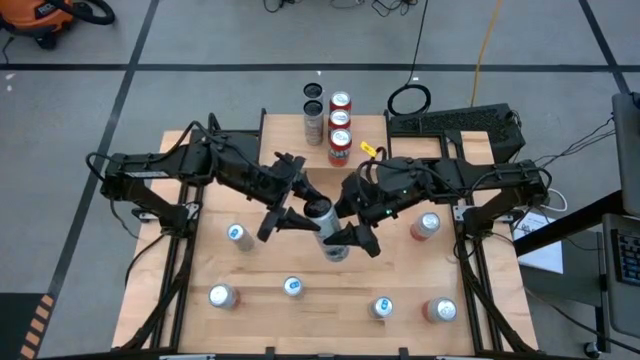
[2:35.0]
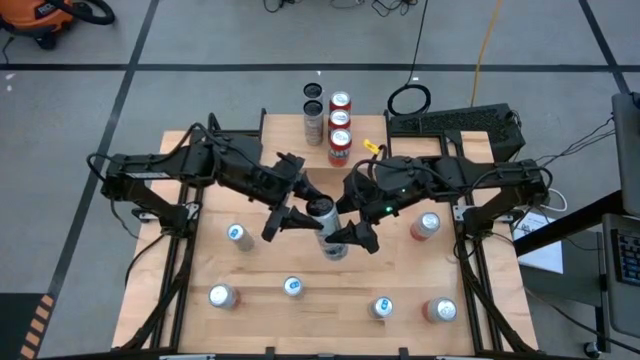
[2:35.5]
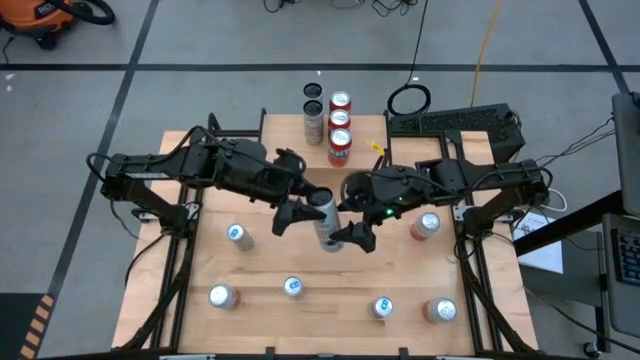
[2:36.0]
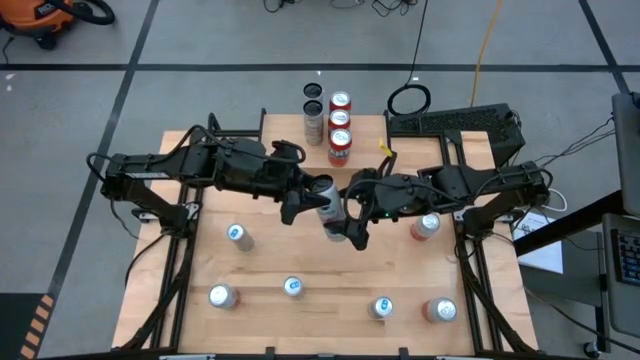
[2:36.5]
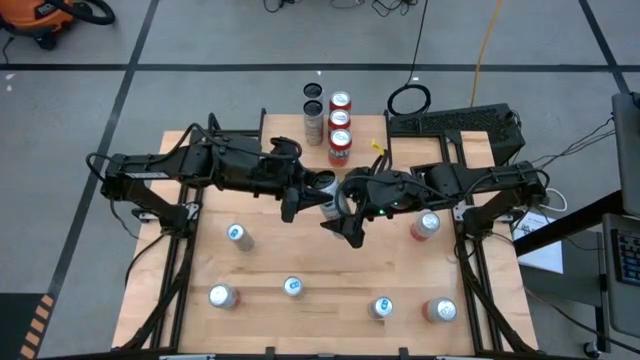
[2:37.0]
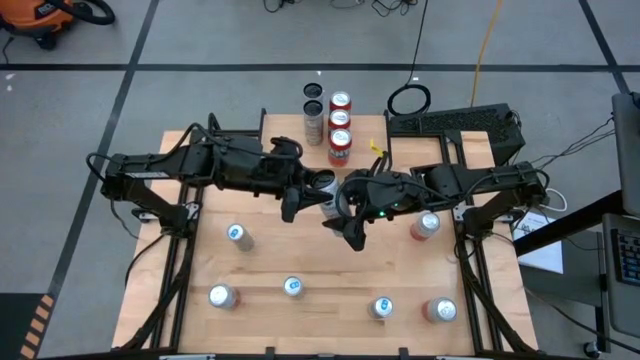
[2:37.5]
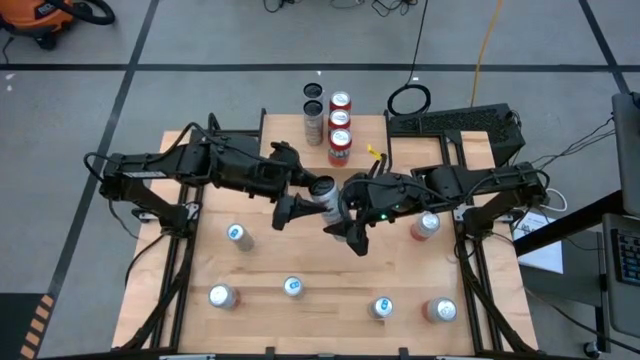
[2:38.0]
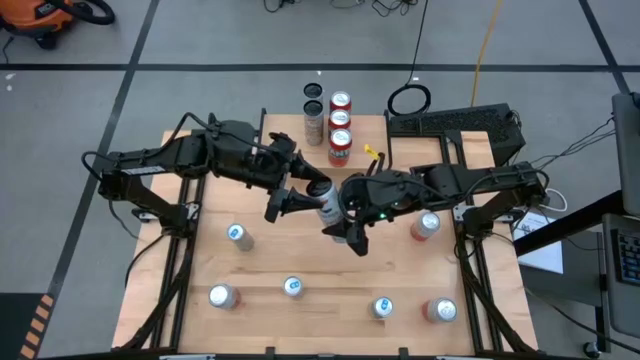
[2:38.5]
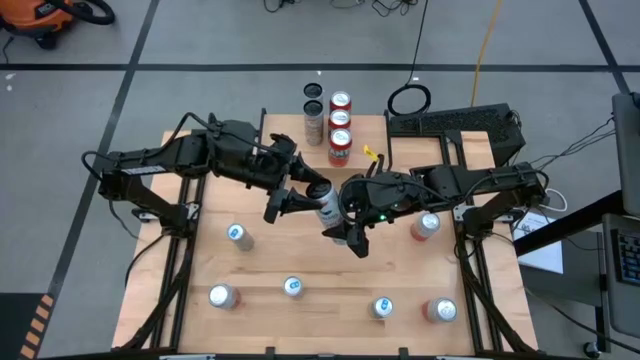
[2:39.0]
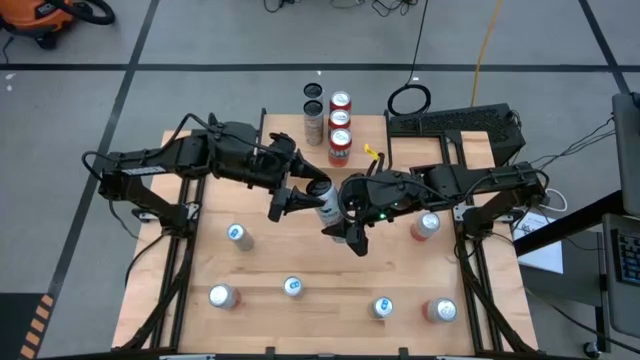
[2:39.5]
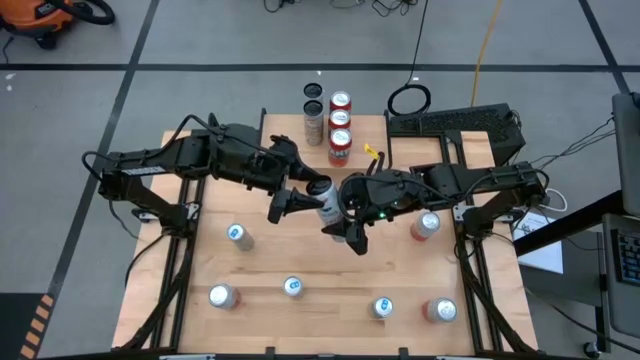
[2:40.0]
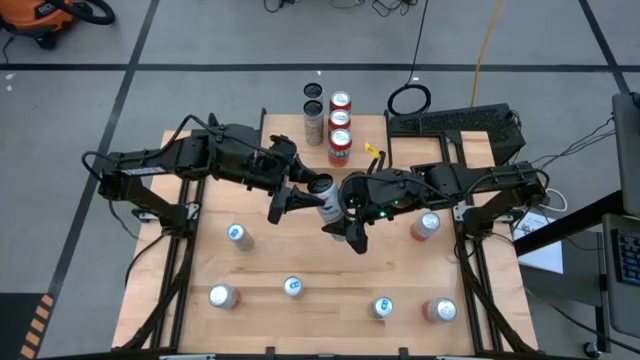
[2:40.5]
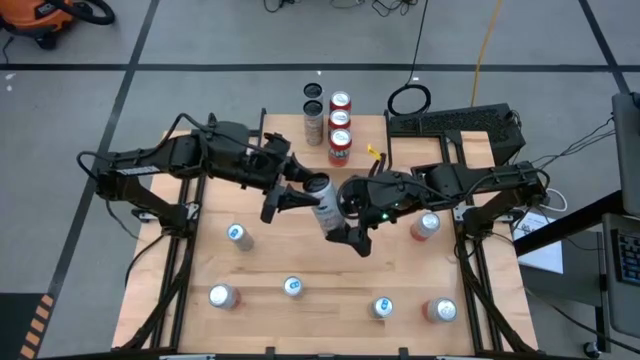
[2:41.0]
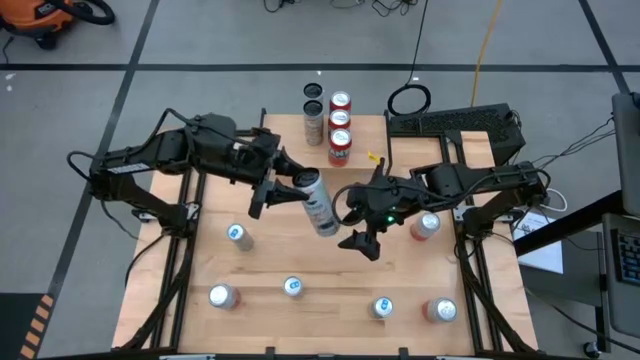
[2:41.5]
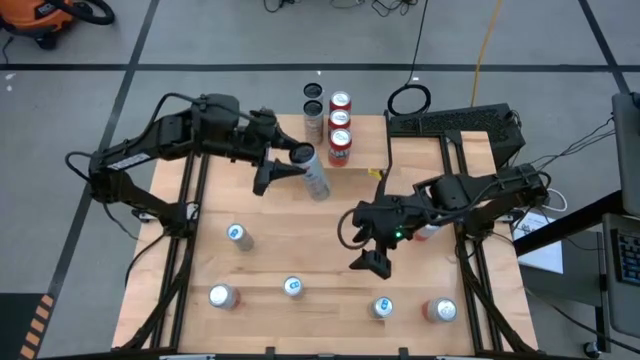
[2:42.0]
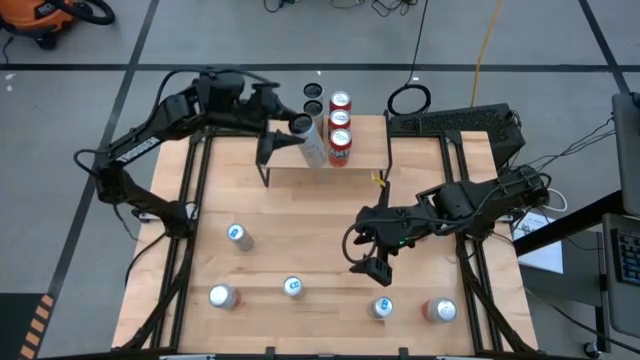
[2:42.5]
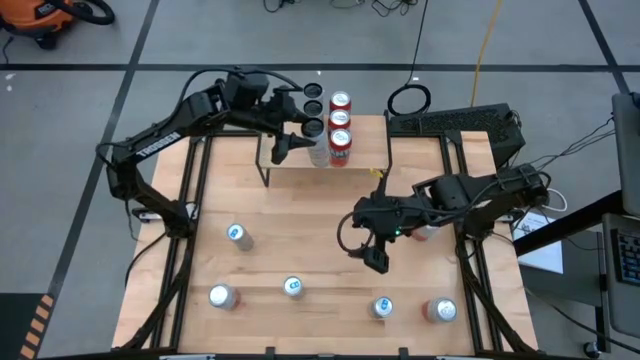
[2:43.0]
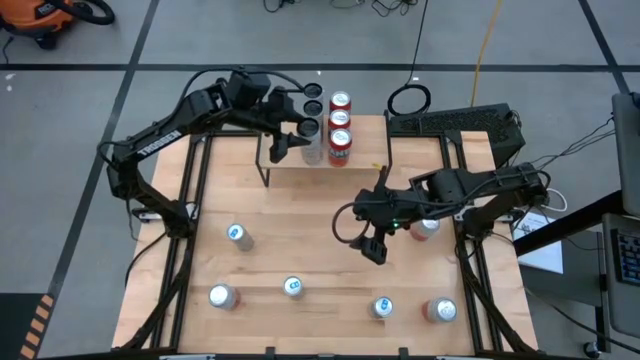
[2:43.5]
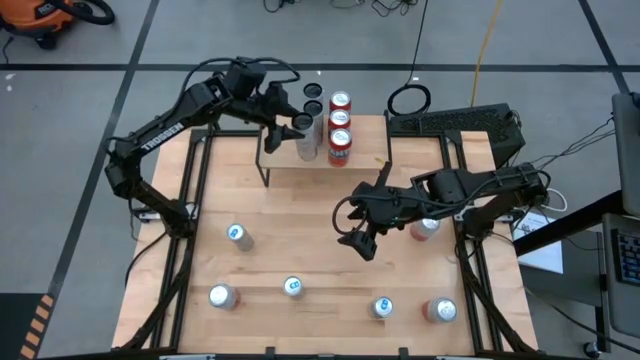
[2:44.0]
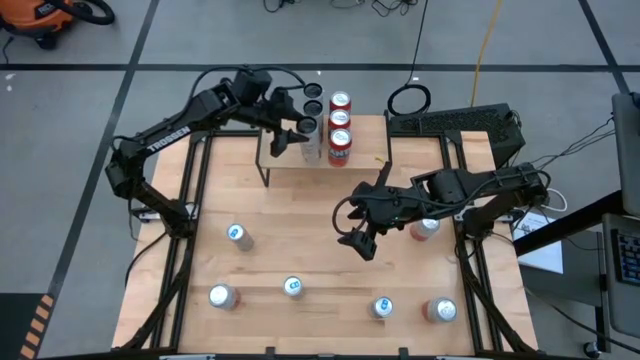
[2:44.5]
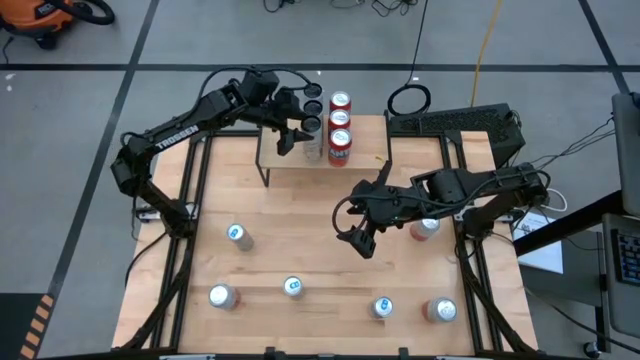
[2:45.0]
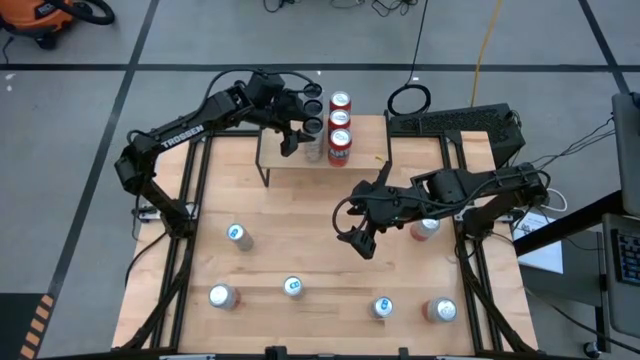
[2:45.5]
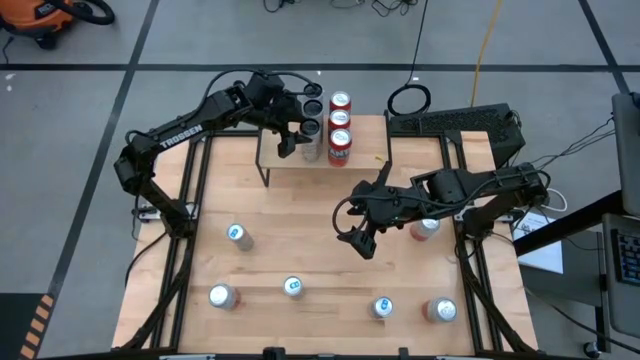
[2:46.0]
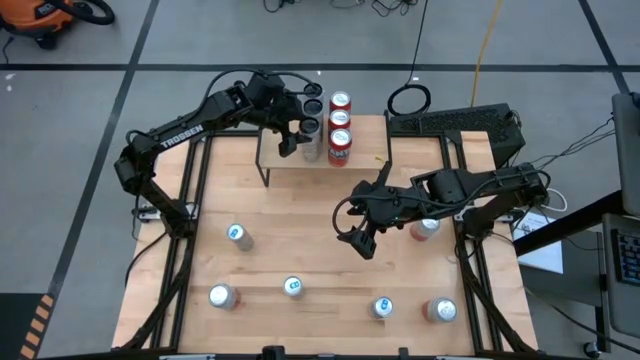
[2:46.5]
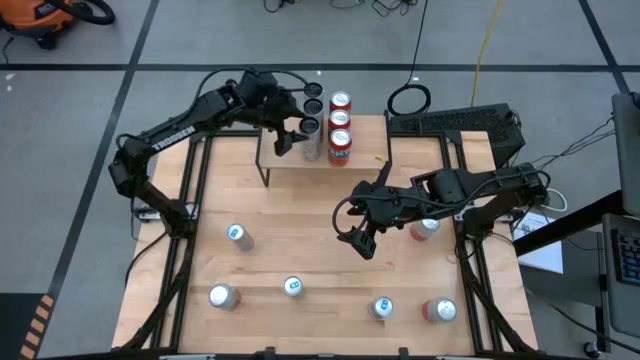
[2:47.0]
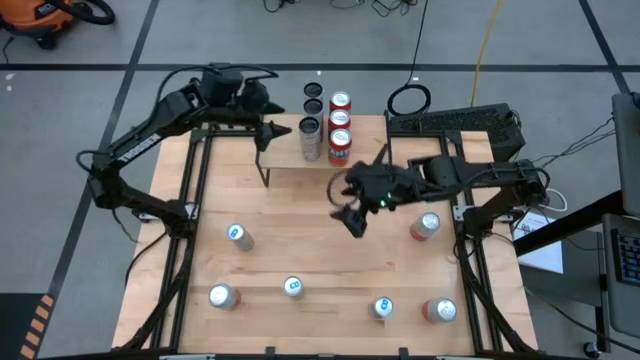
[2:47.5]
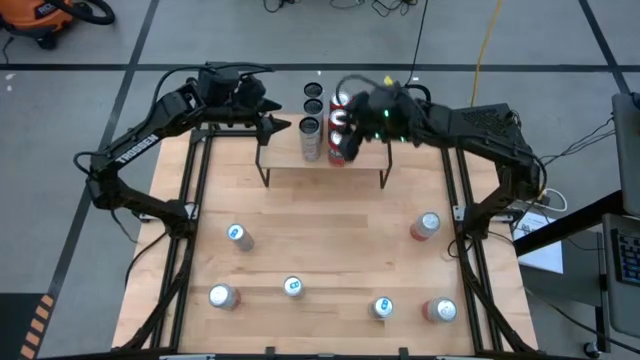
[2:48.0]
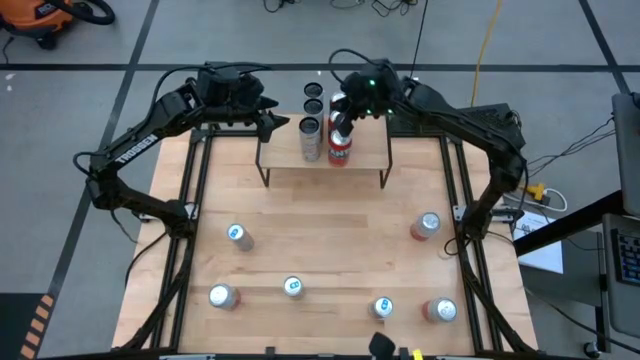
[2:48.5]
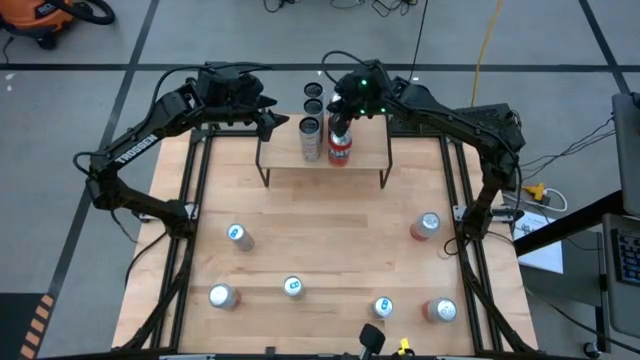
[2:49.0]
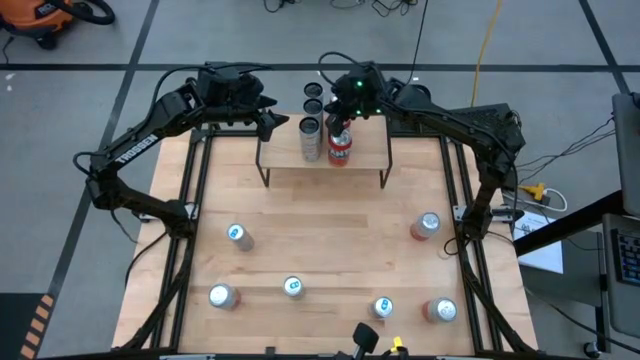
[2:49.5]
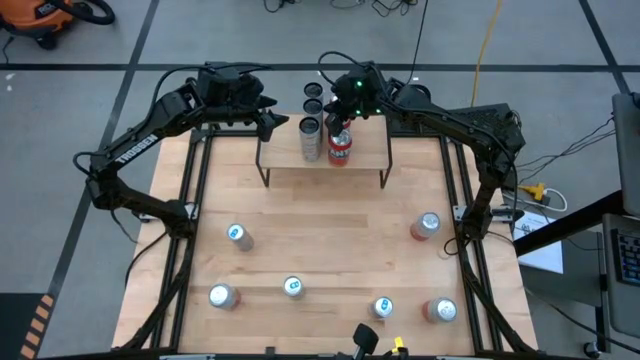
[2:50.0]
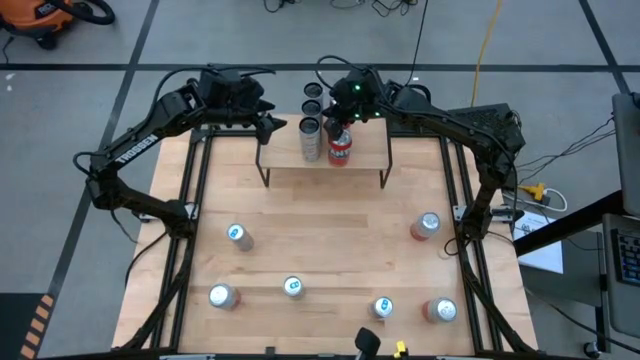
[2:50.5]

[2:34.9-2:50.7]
Task: Place canned beverage on shelf
Put the white and yellow soda can aligned with the other white and yellow soda cans on the shelf
